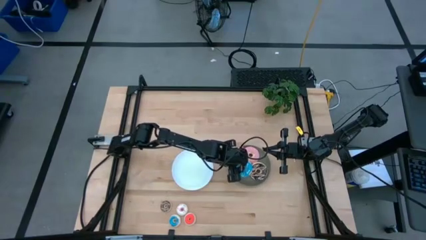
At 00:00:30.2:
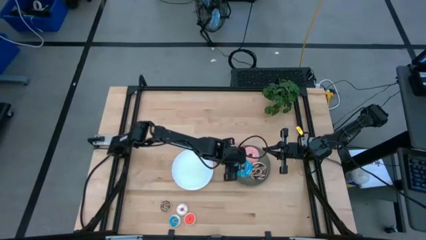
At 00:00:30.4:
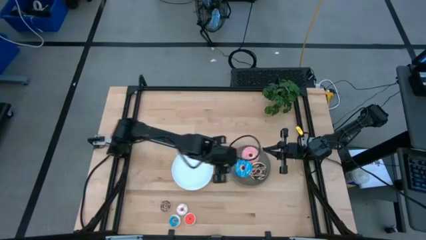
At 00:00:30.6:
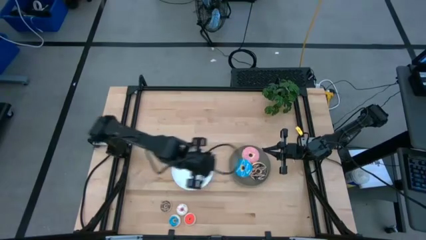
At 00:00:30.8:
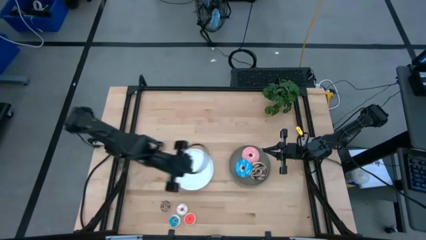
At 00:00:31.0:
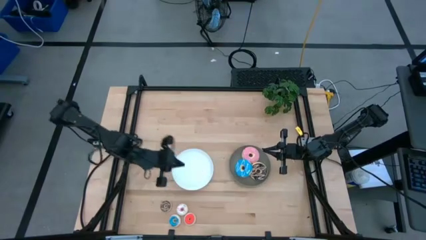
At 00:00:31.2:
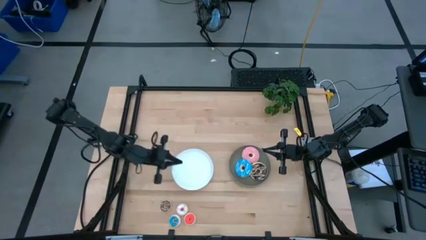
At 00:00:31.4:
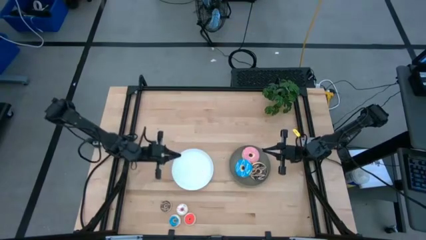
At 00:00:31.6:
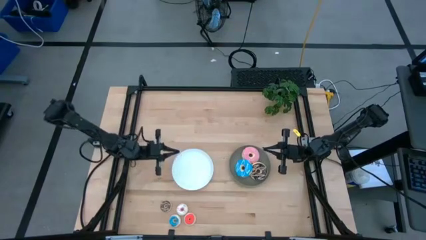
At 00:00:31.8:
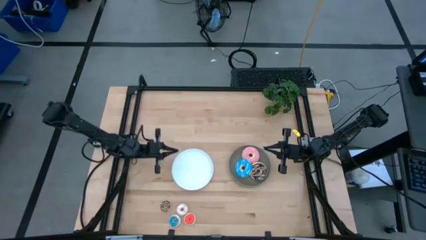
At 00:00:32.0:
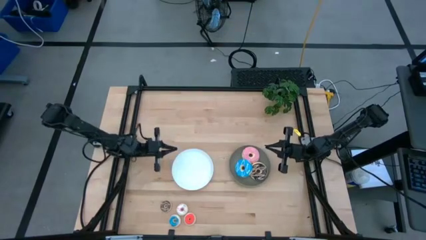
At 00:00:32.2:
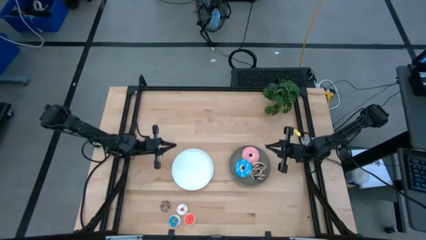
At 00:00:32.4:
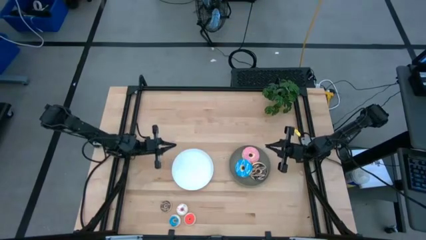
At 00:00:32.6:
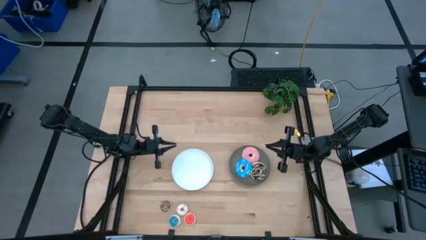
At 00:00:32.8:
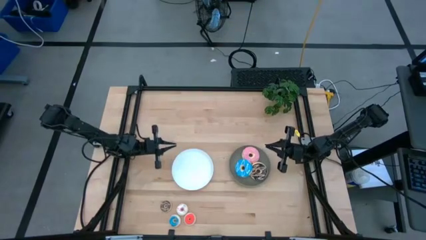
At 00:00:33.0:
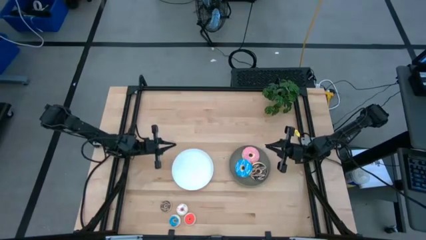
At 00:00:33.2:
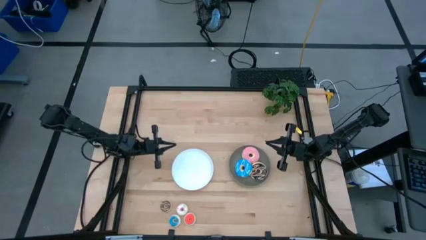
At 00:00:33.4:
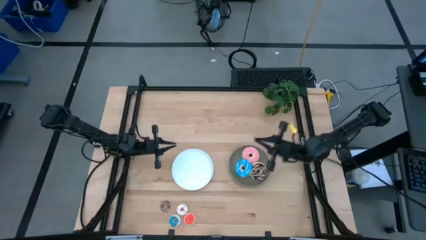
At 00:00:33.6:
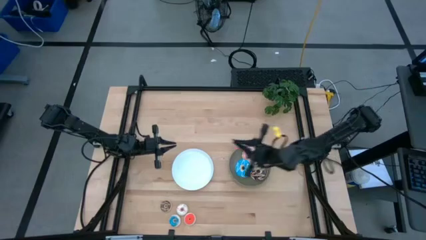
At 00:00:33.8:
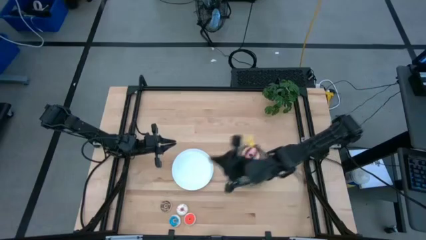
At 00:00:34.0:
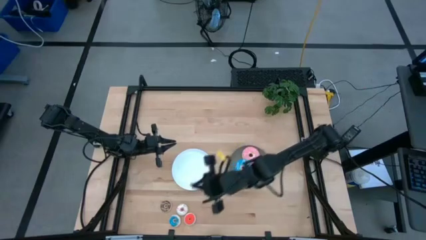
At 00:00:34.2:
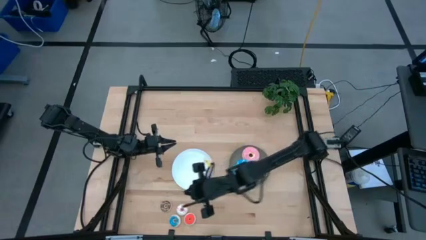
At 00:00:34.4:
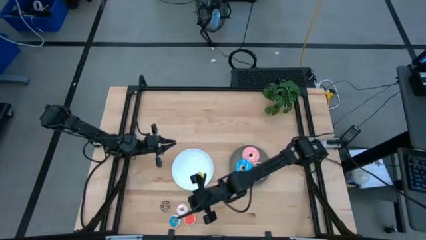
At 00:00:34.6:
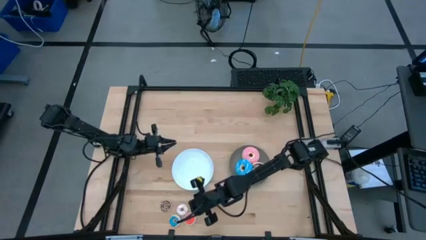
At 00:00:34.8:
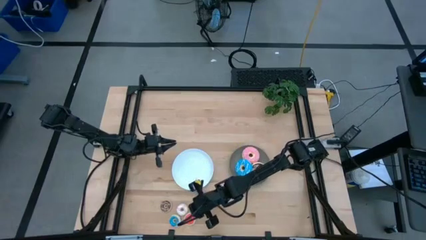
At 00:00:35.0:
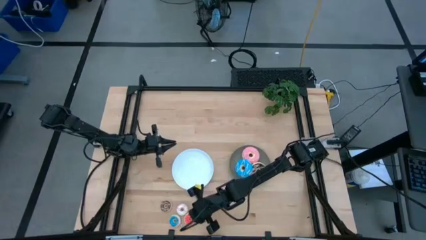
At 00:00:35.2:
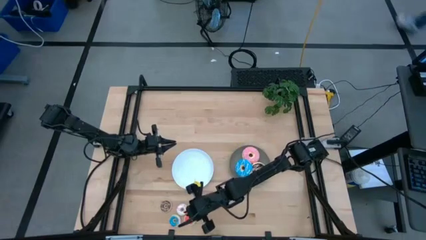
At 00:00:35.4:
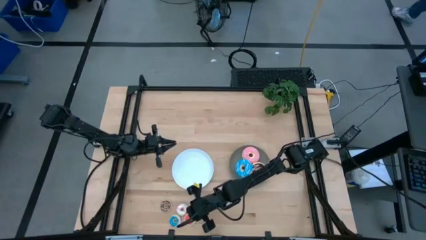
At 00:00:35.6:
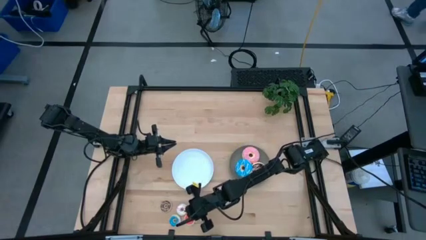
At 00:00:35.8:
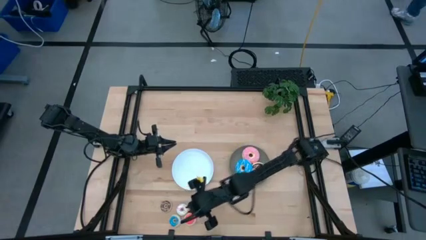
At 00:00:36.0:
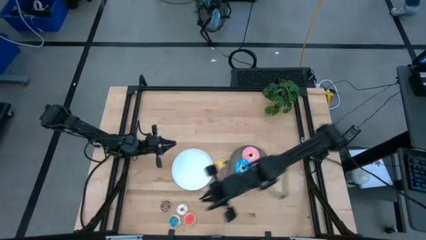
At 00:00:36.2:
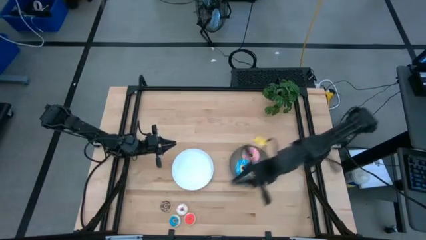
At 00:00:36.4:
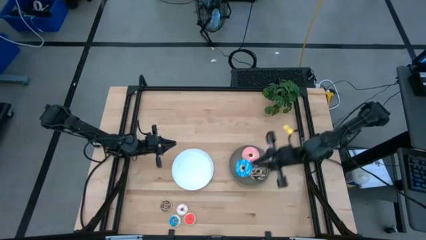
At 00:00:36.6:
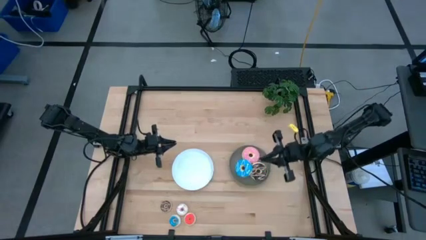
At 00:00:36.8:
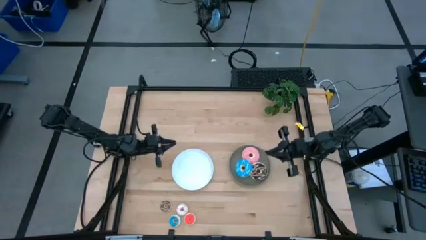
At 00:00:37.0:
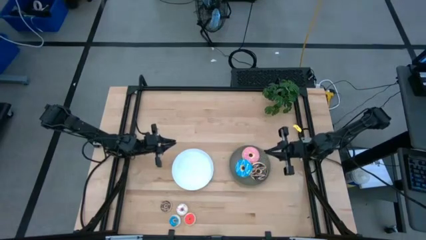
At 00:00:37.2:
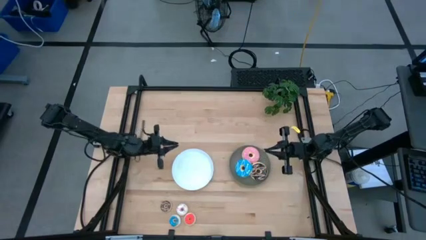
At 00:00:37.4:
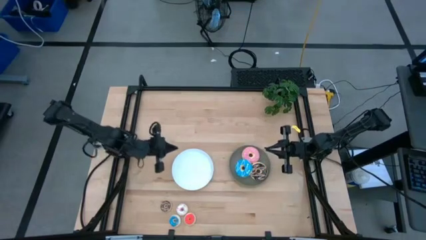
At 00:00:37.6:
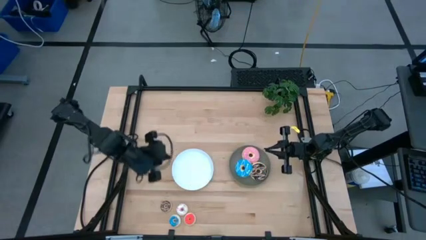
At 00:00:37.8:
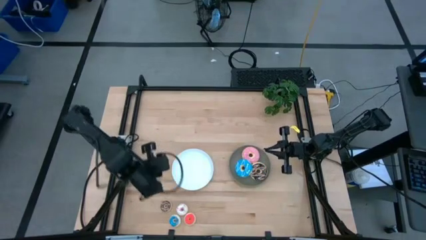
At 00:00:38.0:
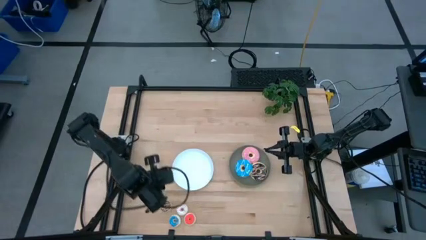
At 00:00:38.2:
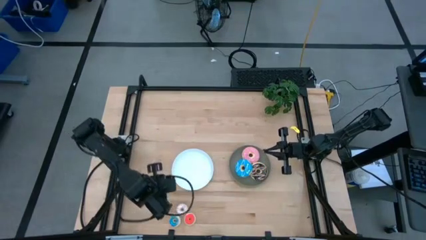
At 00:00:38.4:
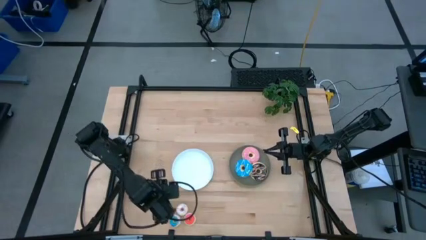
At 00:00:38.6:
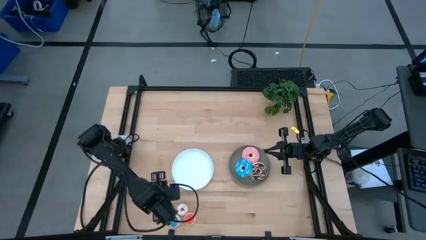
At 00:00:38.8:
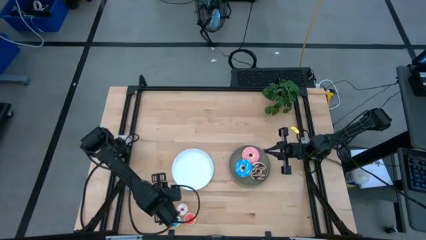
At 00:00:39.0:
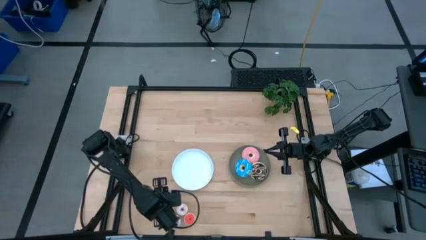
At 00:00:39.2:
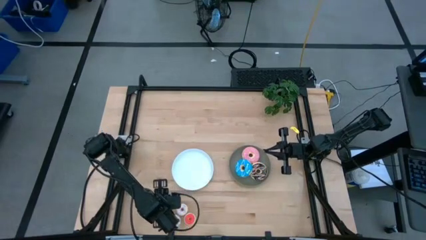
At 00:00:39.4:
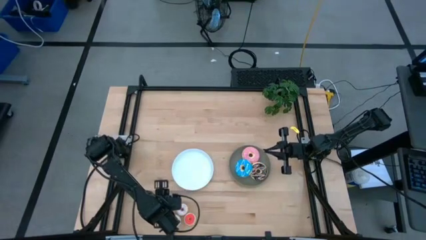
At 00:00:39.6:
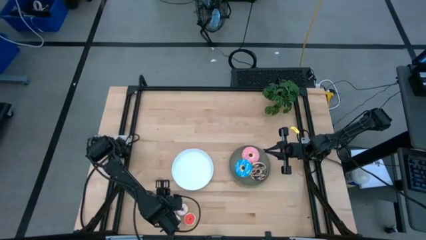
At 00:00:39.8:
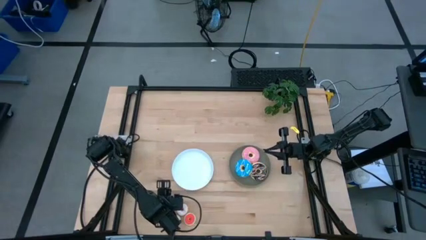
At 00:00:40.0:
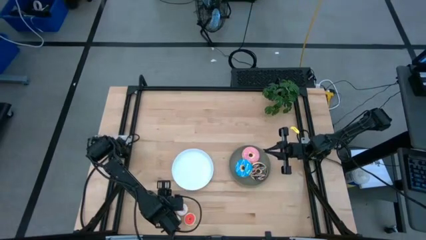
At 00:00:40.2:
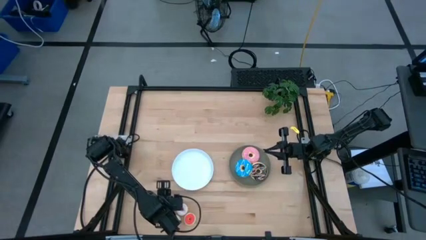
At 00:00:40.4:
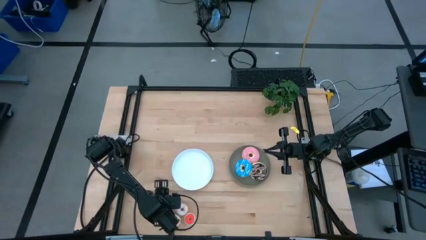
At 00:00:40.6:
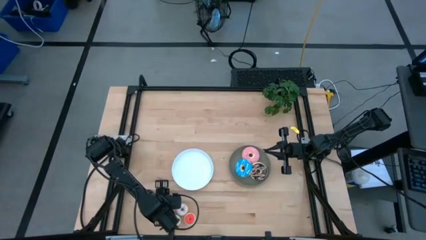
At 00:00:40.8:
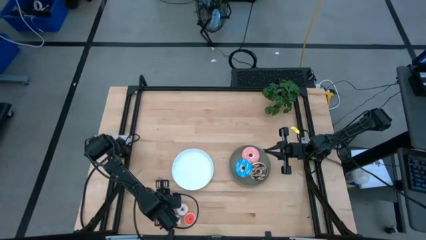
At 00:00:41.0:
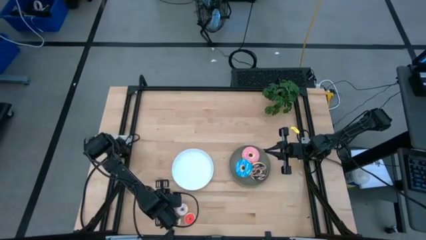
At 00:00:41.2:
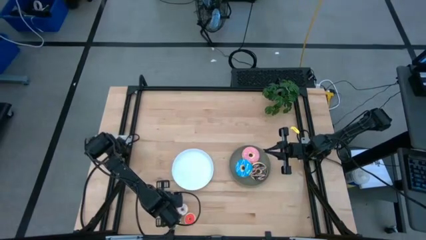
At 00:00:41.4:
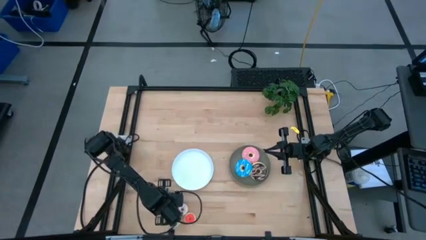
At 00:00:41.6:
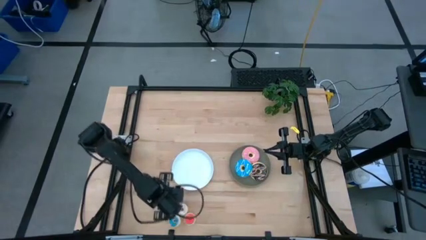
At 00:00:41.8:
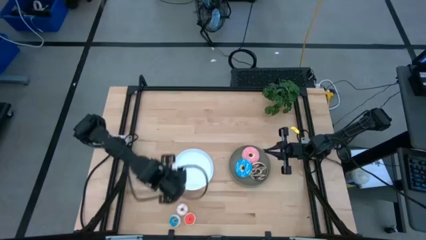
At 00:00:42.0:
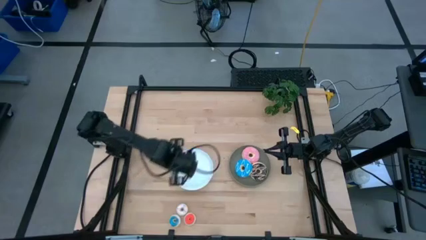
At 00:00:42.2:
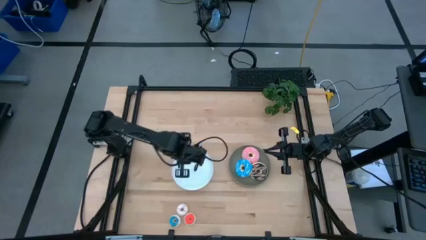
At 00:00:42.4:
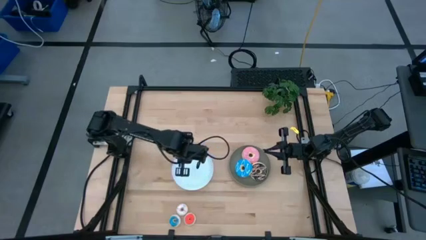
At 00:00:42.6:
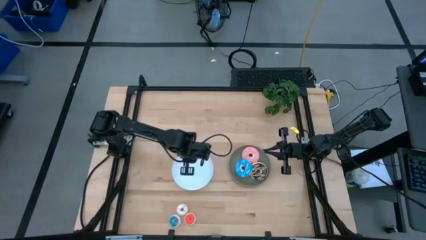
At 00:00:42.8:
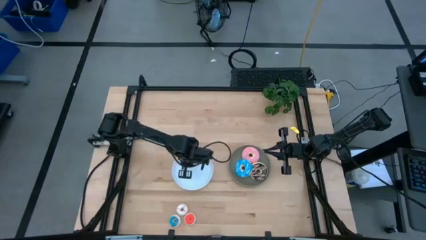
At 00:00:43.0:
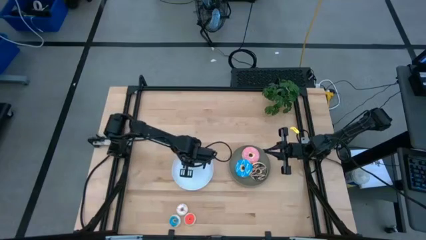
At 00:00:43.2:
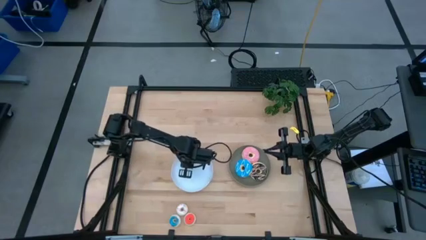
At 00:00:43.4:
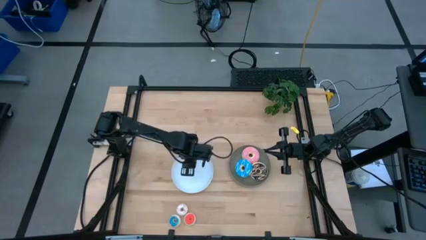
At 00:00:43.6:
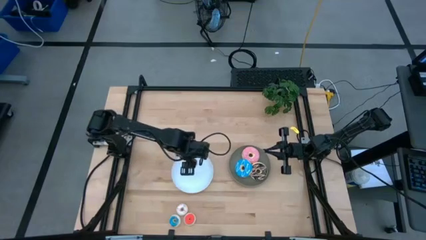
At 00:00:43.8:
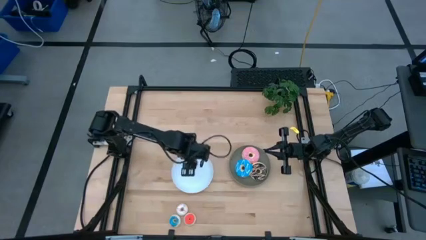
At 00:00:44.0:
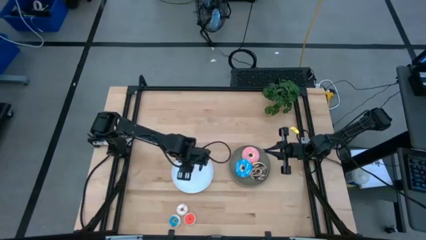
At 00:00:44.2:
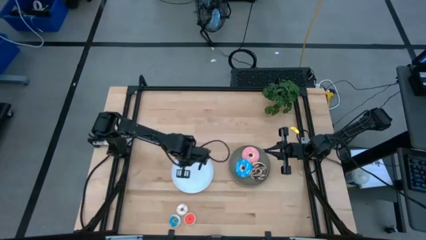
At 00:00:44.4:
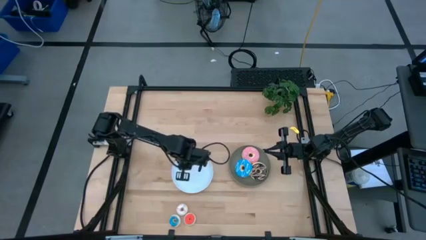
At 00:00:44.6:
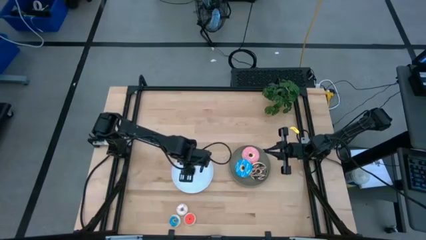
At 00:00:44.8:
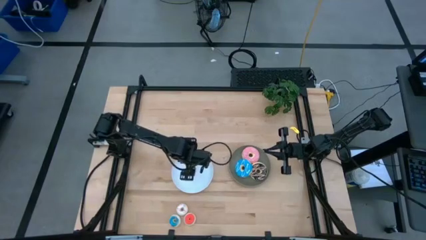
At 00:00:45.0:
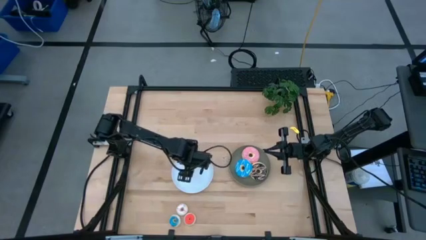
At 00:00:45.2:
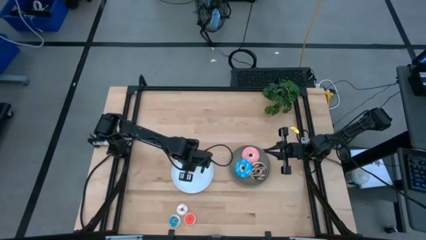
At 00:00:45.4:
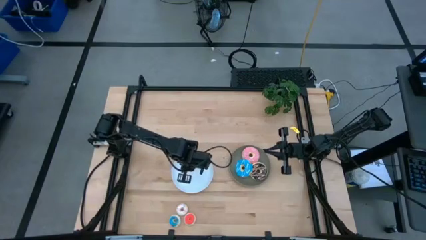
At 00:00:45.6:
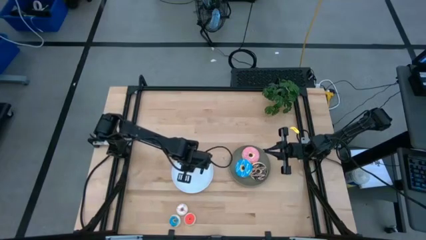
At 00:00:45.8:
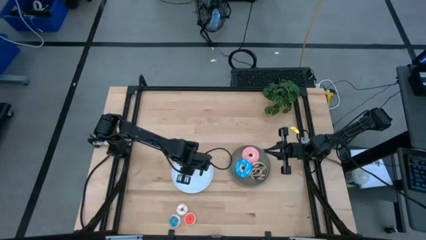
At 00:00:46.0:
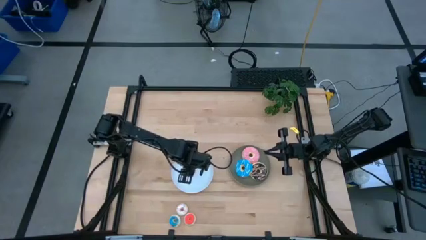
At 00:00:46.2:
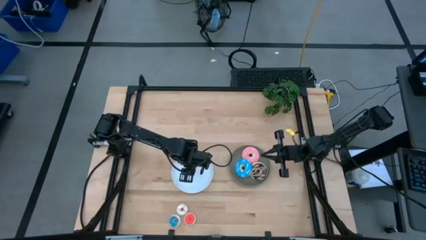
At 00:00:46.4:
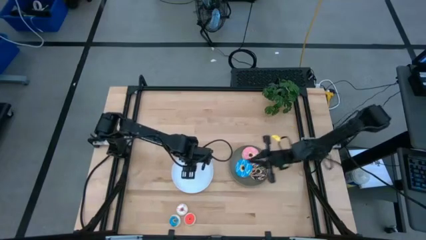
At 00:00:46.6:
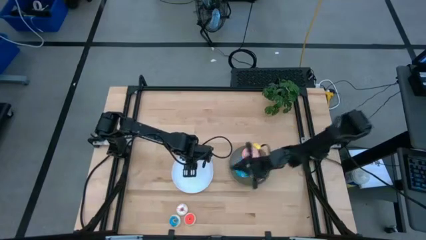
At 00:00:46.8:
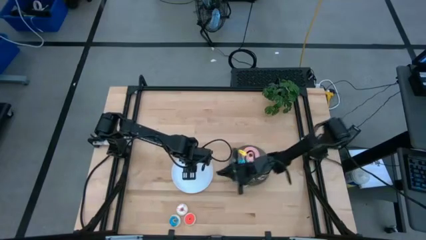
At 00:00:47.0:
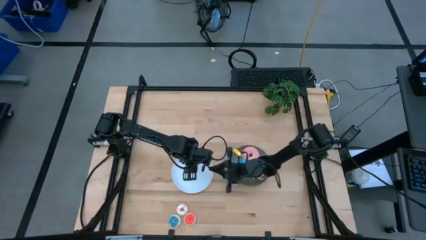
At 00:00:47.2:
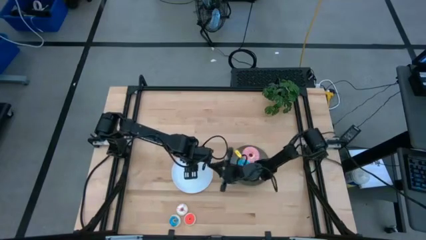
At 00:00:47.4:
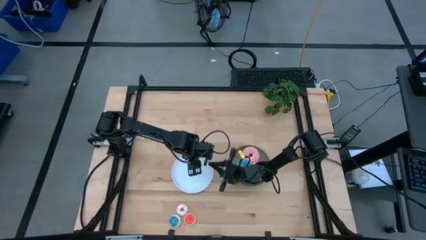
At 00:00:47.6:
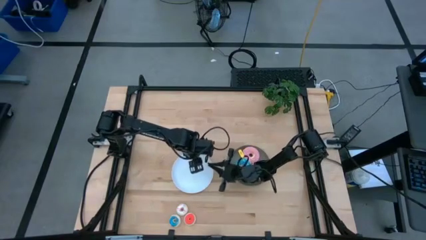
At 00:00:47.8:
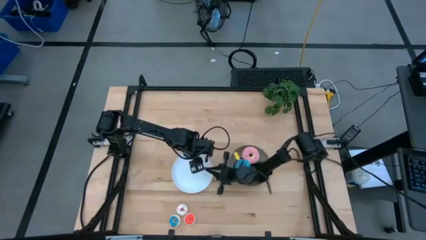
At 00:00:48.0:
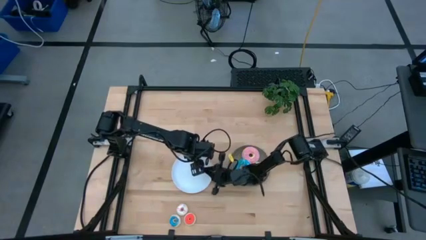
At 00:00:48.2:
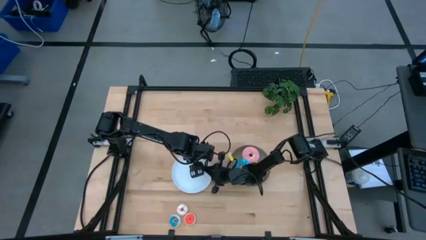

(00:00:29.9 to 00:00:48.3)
Task: Pick & Place donuts
Put the small brown donut on the white plate
